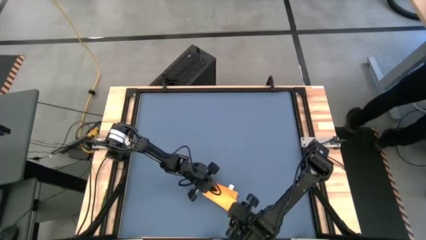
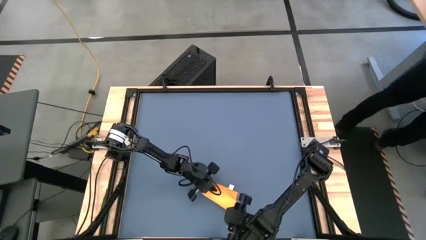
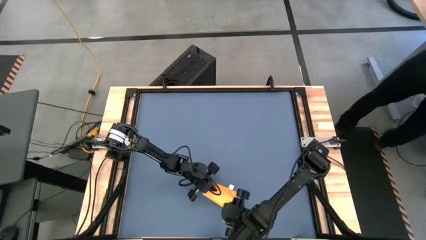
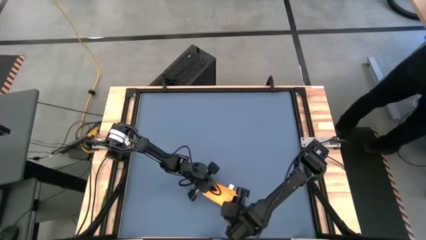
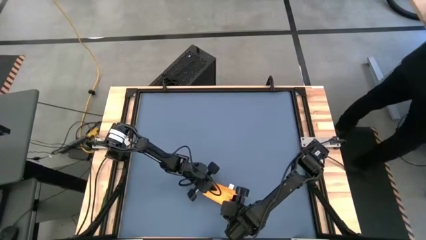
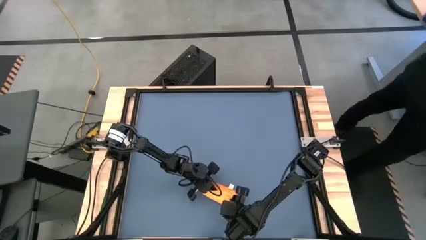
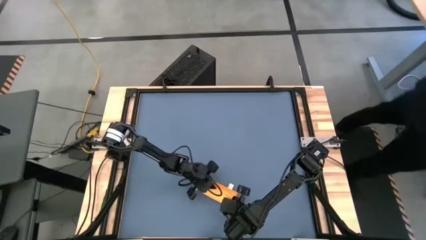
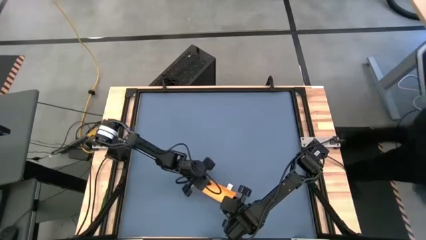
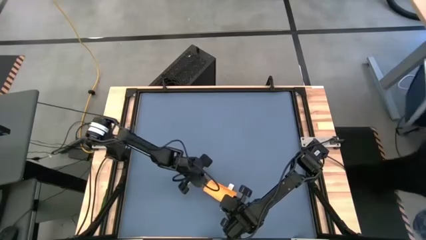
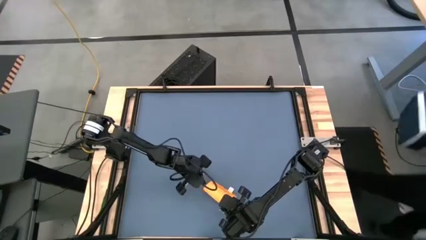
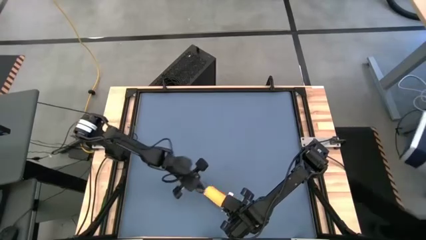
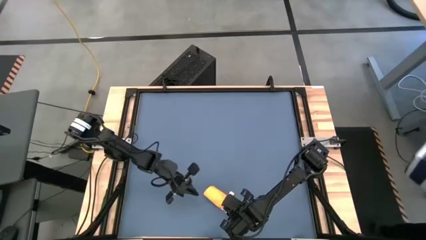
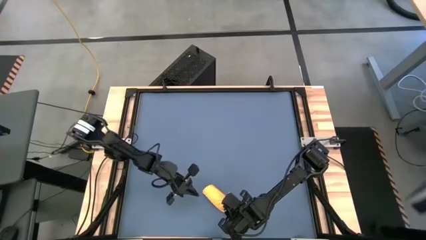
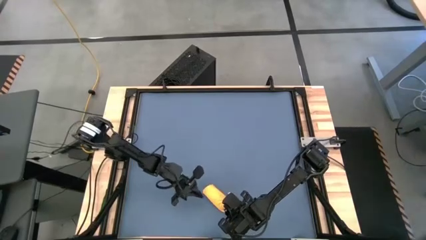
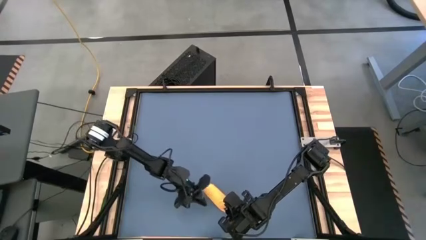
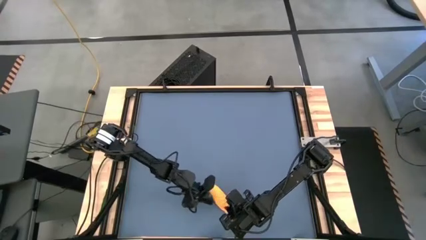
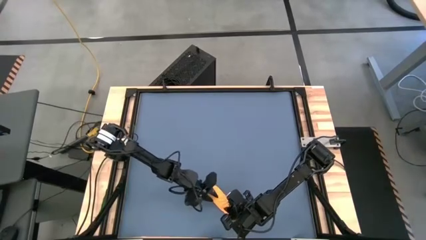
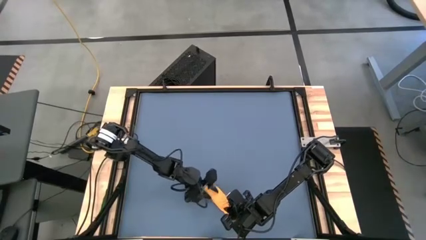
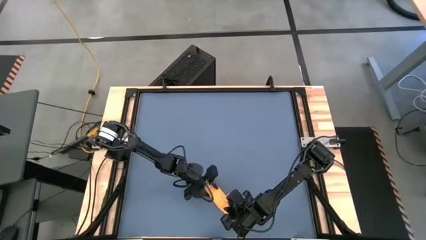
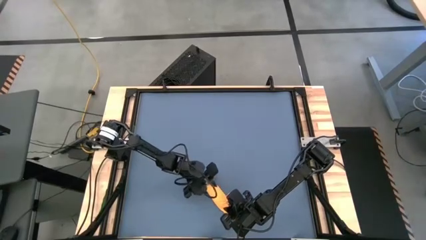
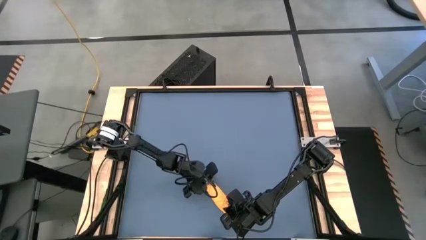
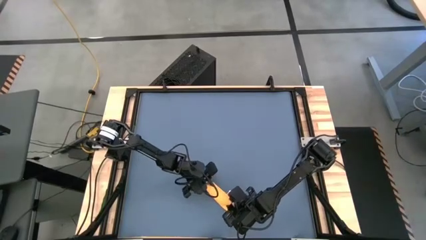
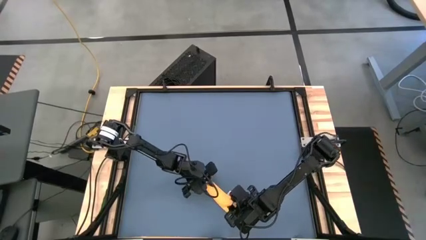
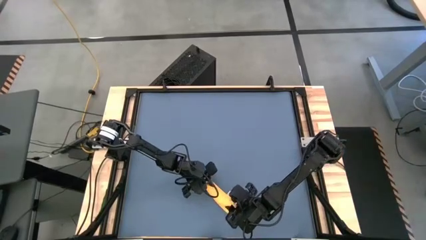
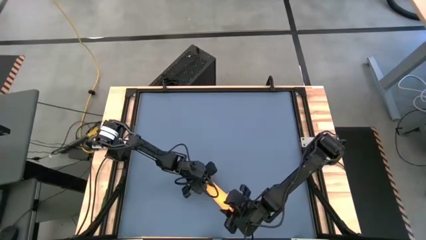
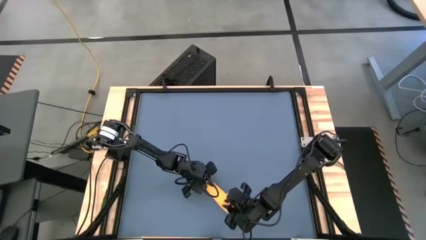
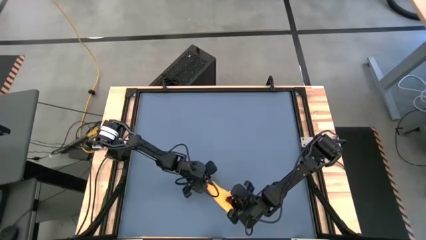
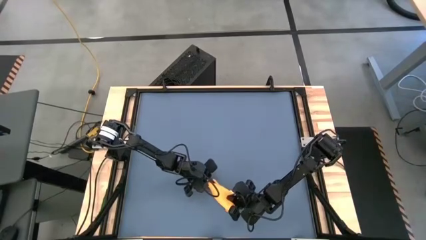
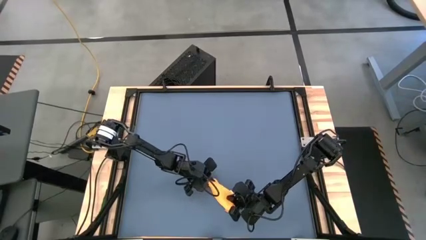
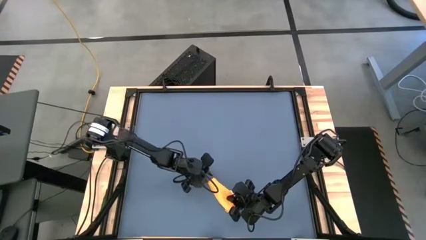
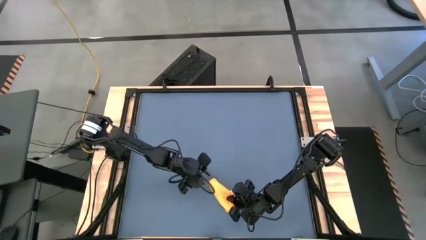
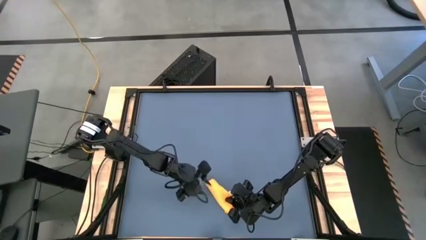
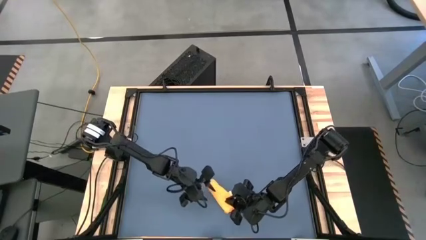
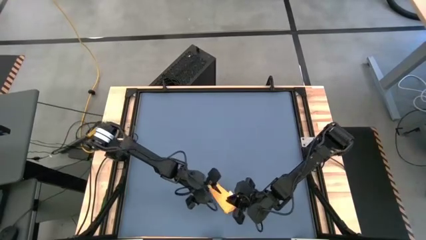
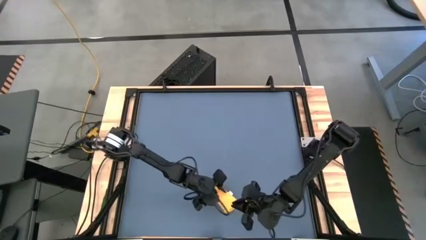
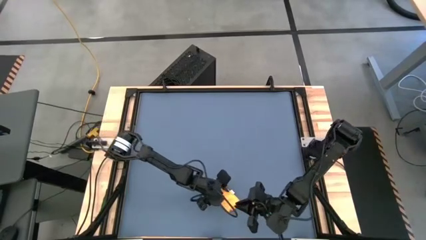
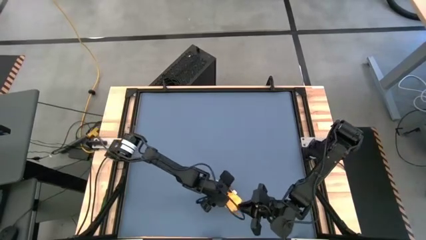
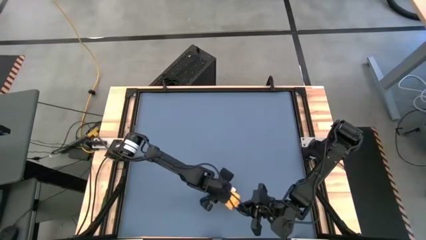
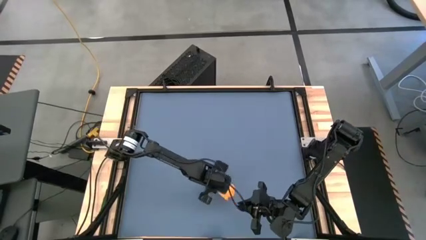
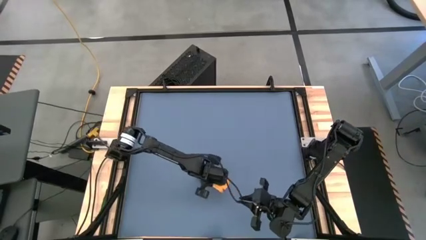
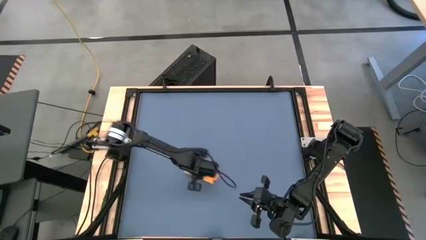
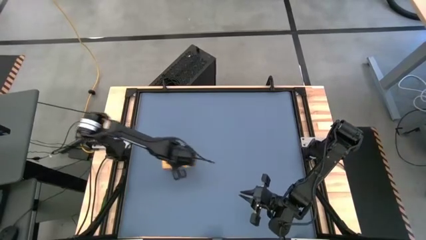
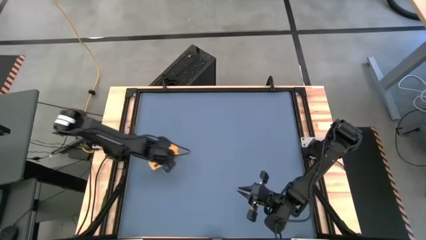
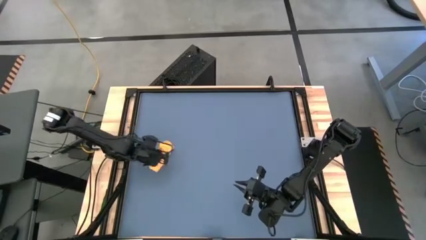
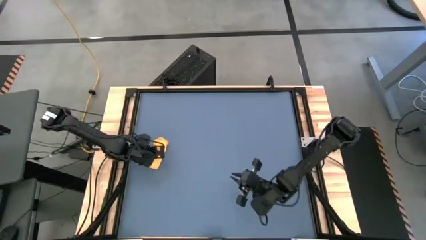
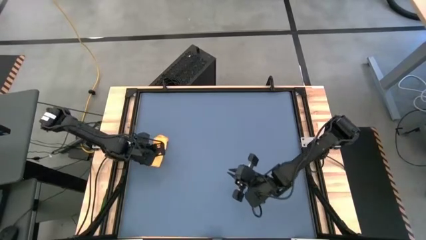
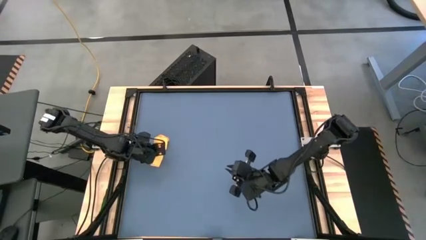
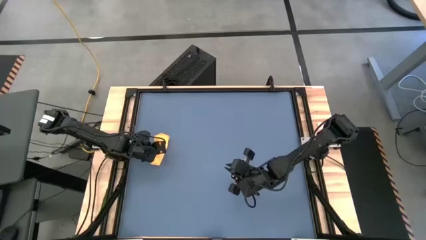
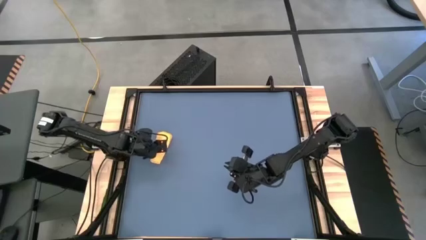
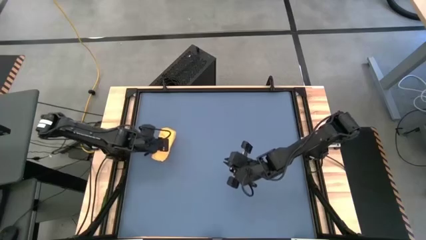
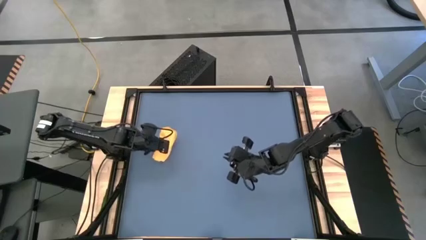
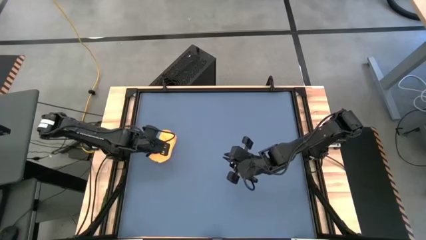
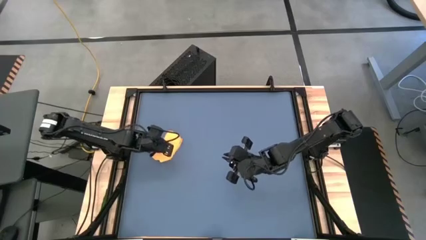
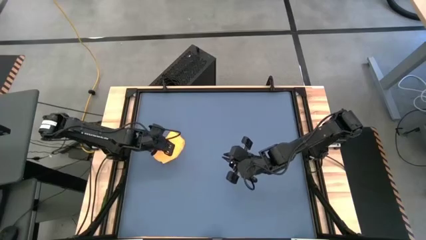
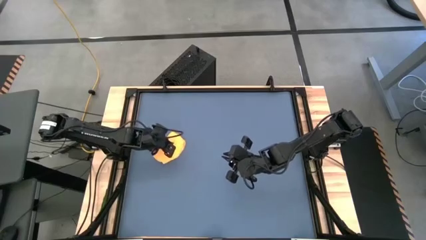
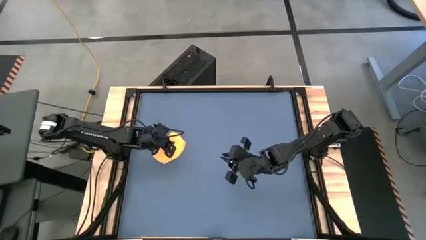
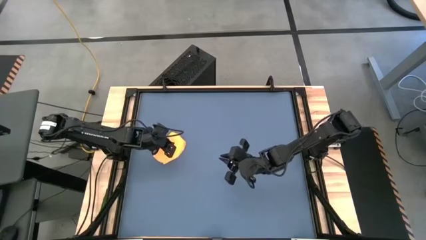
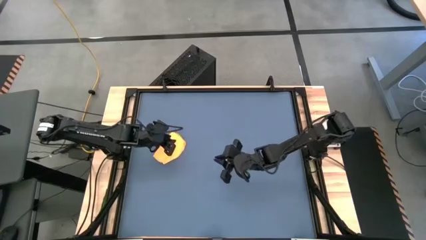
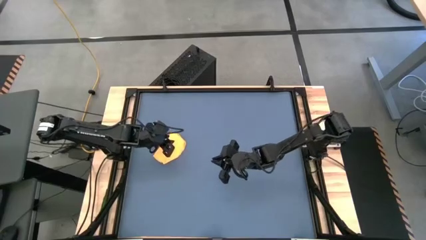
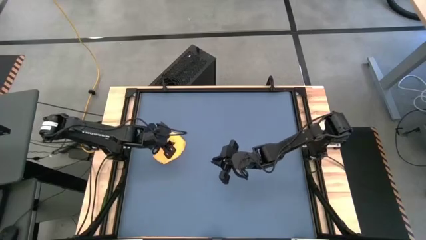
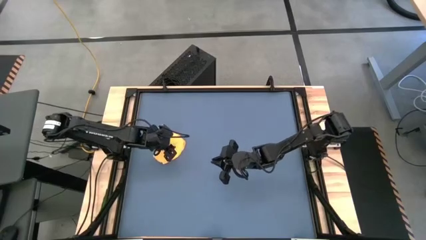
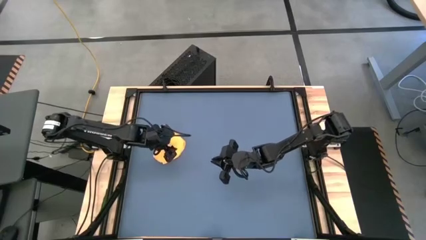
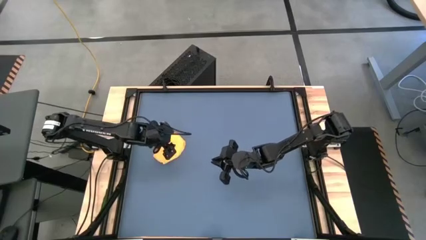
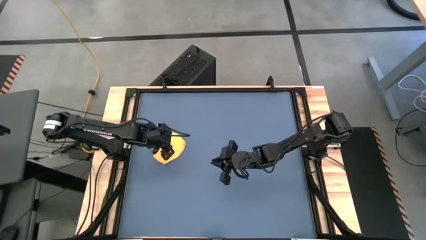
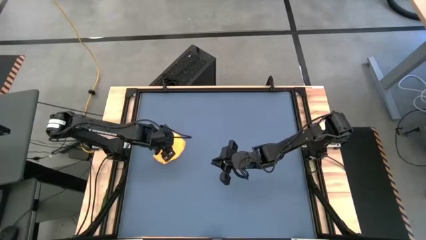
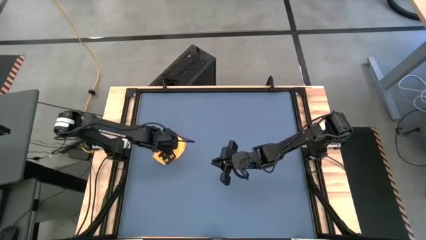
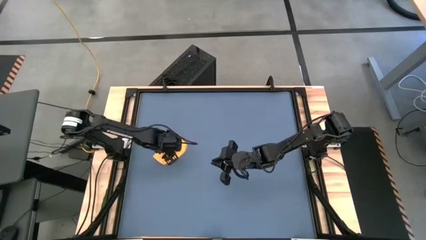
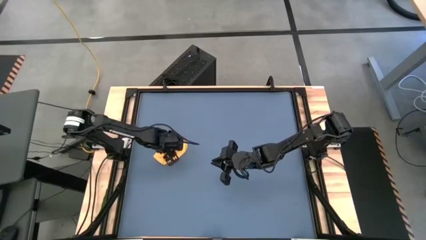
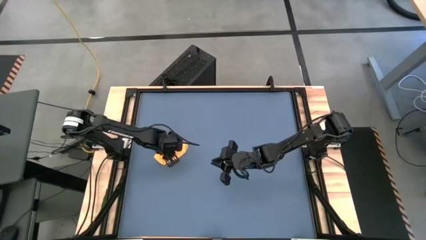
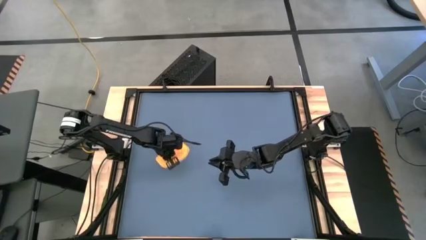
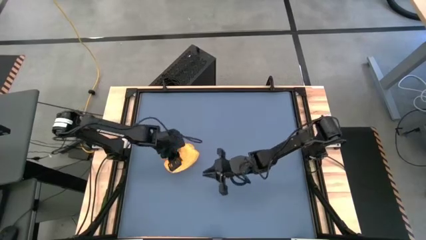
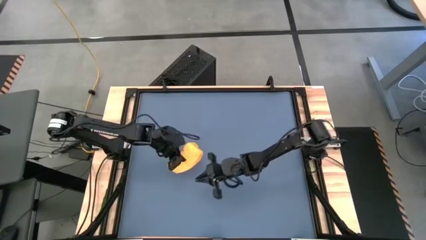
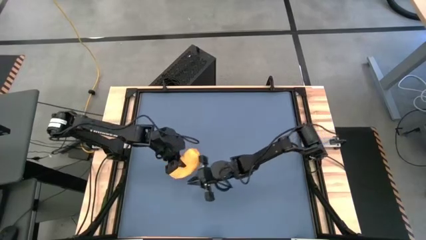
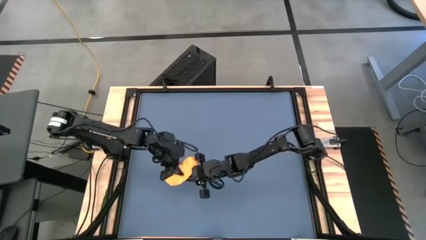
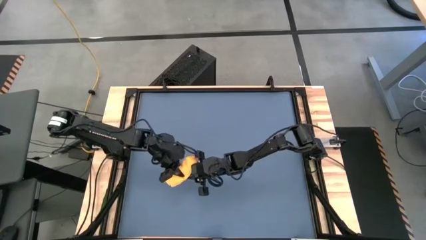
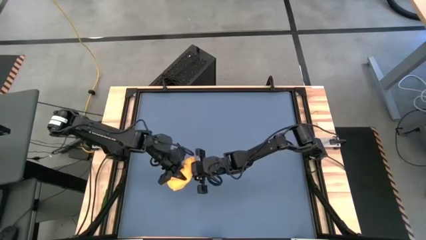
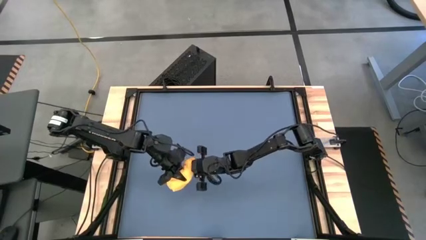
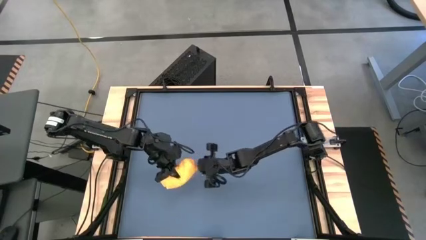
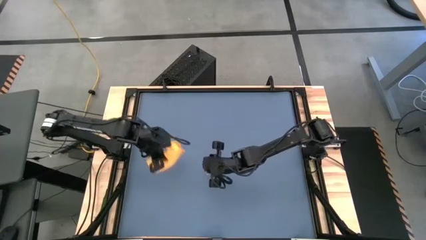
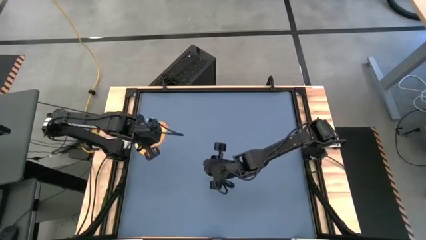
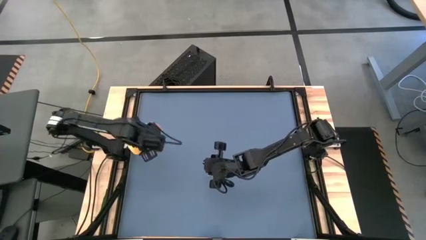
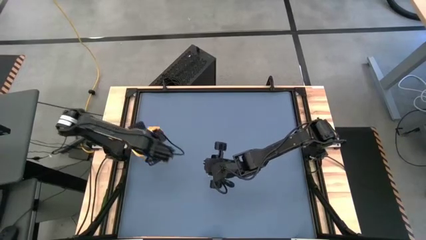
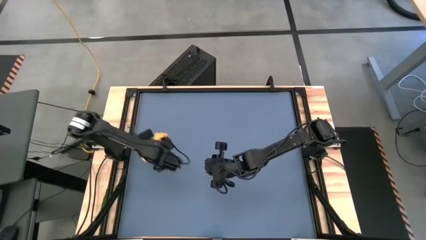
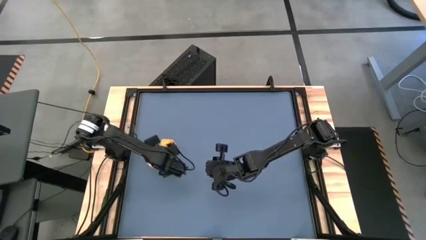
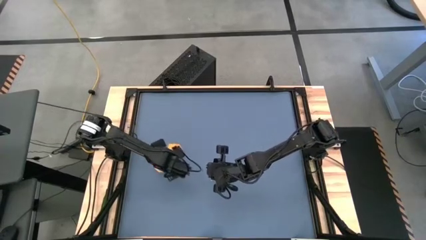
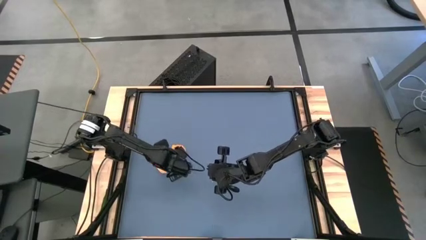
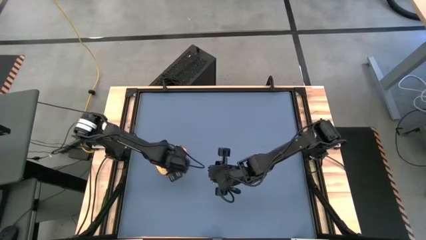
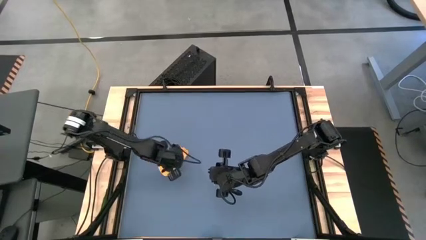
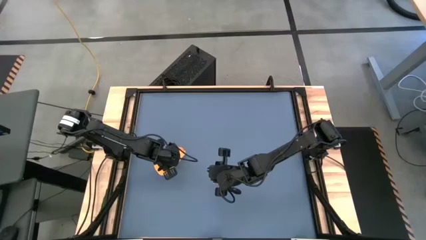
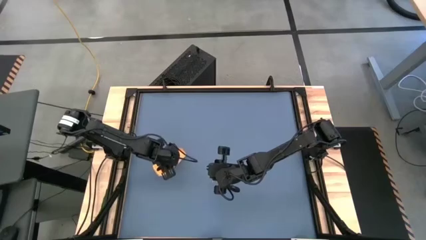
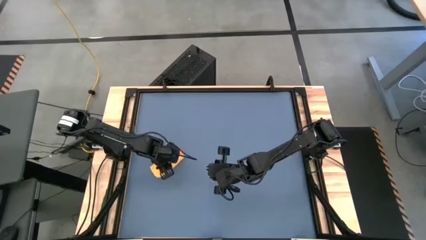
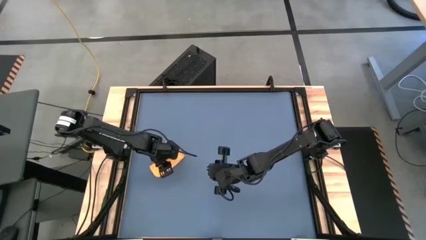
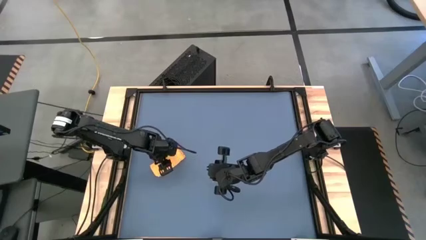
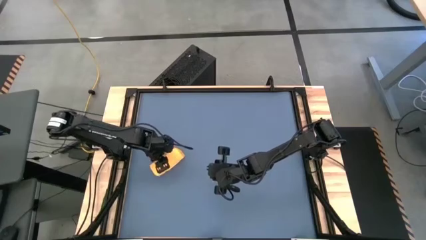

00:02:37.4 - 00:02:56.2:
Task: Roll towel
Roll the yellow microfiber cloth
